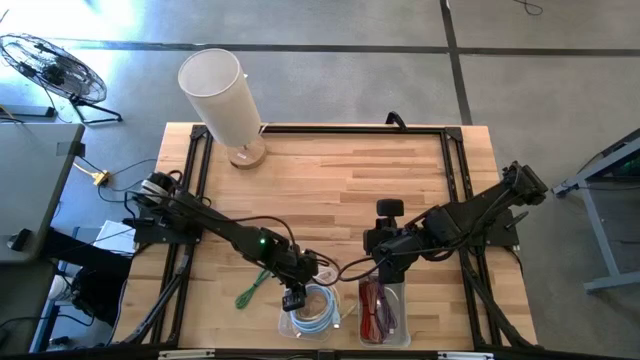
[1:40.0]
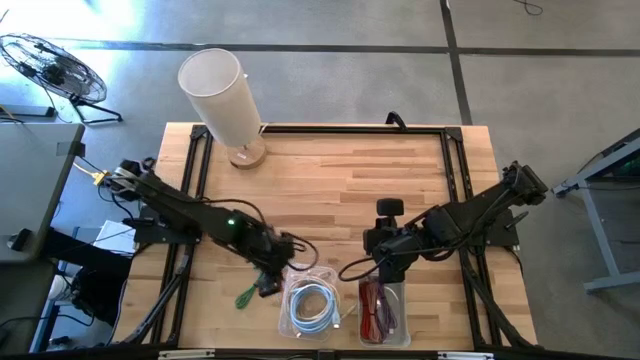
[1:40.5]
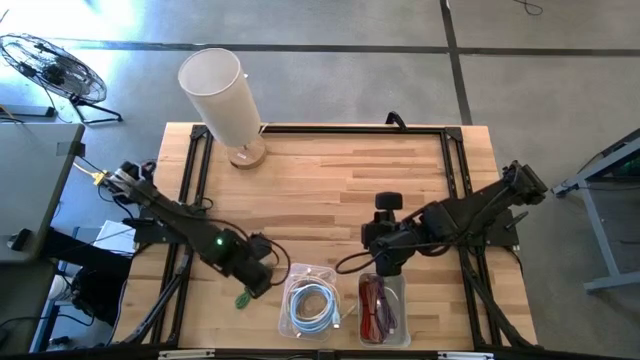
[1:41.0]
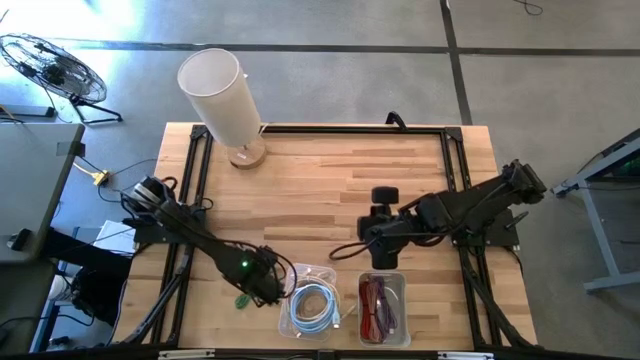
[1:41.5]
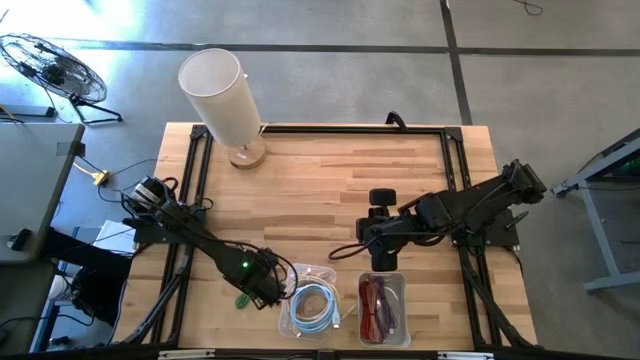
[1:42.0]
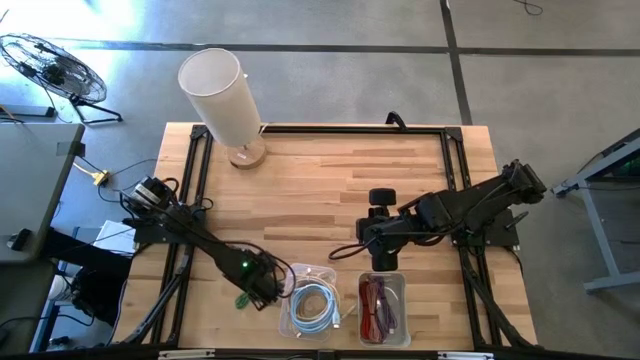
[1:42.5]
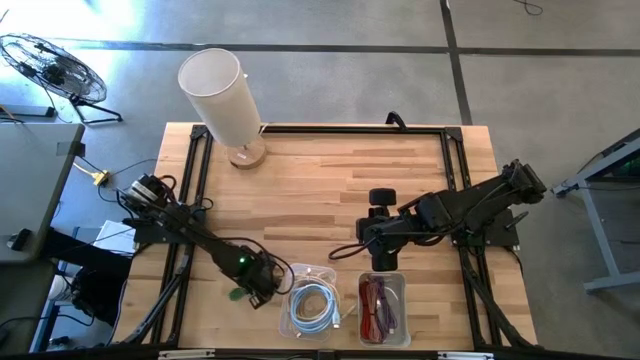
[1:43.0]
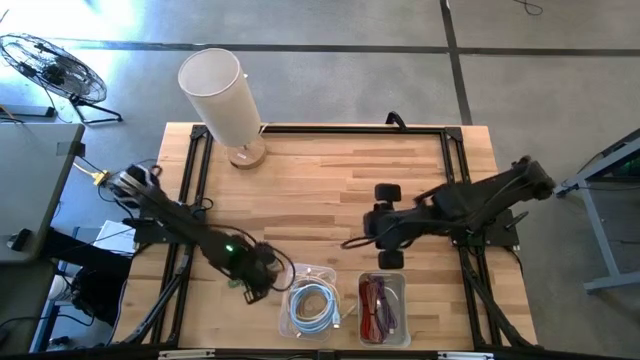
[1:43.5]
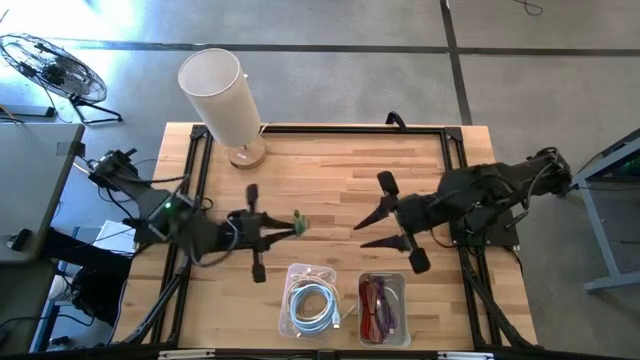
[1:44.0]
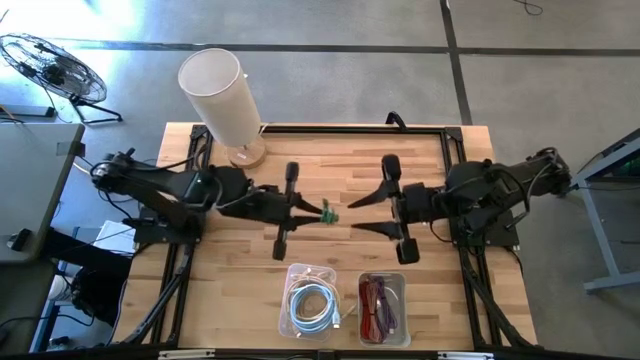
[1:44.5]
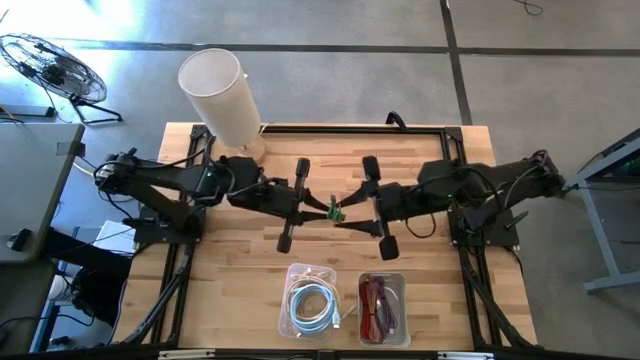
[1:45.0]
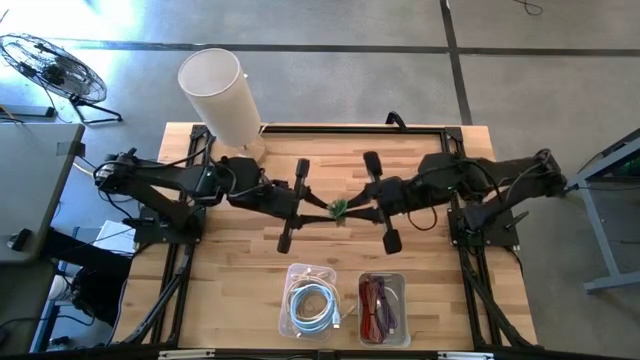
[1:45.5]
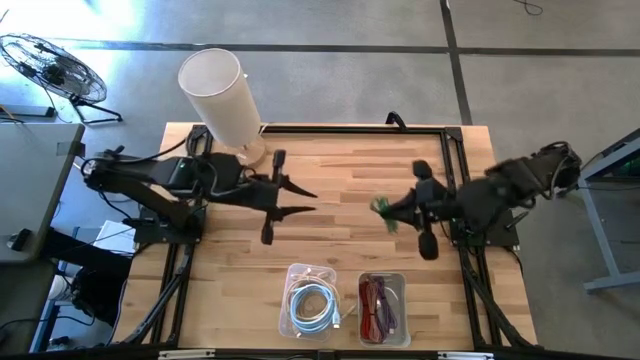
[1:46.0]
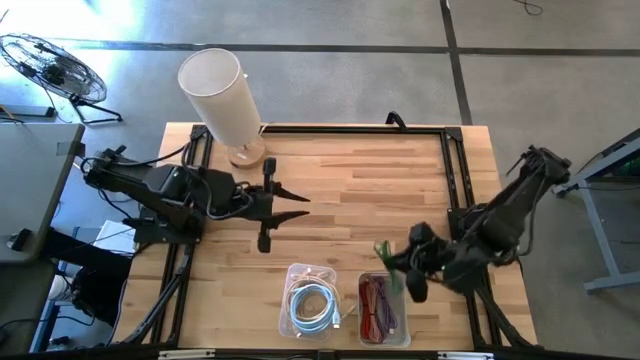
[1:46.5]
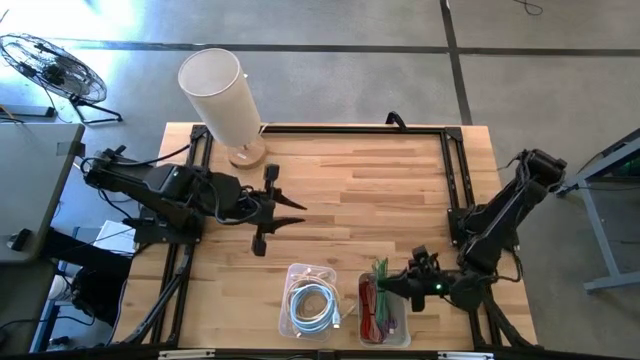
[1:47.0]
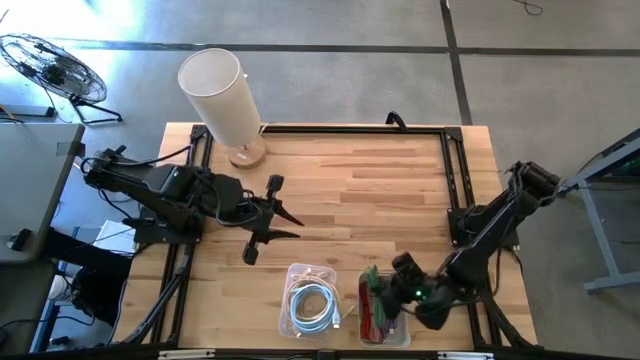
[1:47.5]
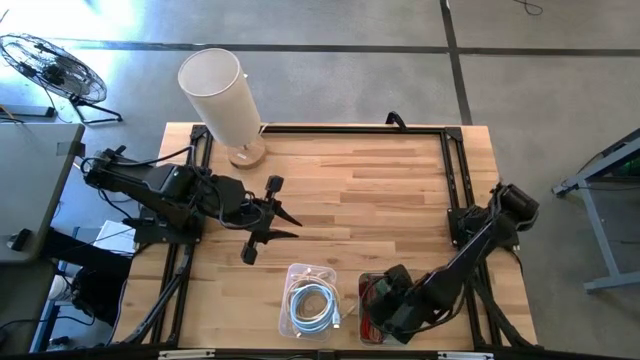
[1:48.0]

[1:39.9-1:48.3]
Task: Pick & Place USB Port
Put the green USB cable into the gray bin

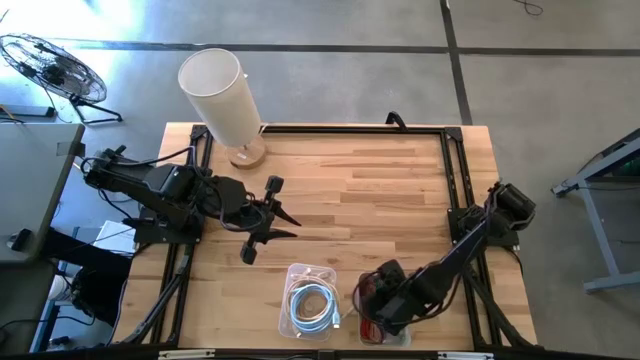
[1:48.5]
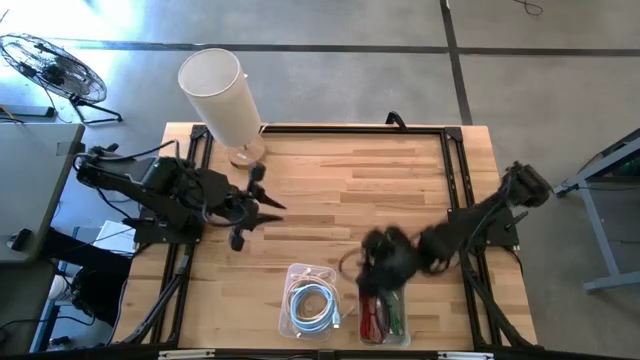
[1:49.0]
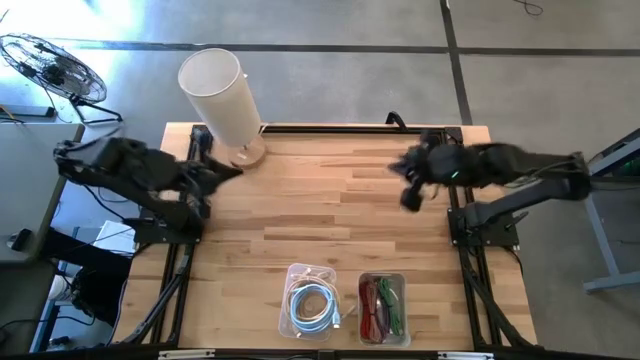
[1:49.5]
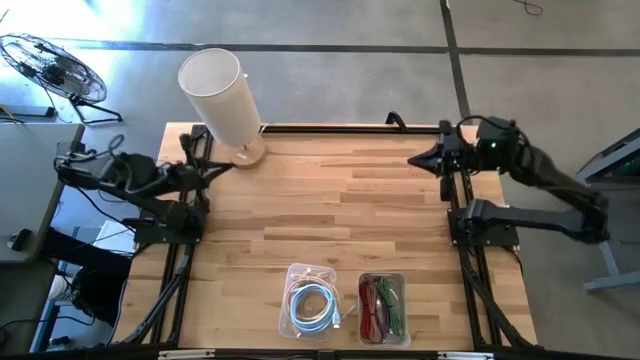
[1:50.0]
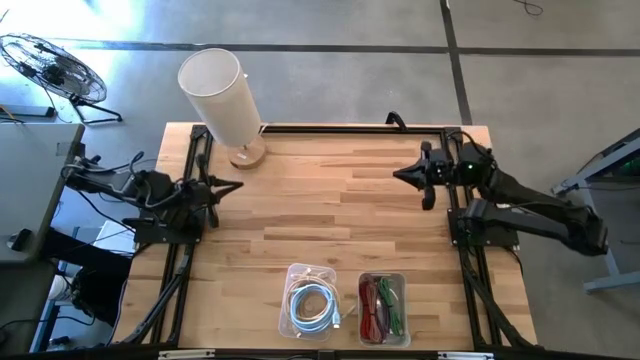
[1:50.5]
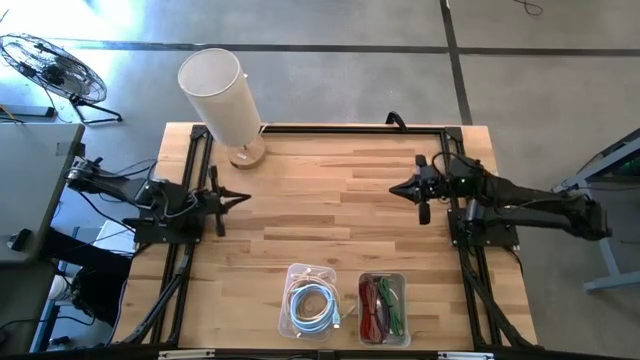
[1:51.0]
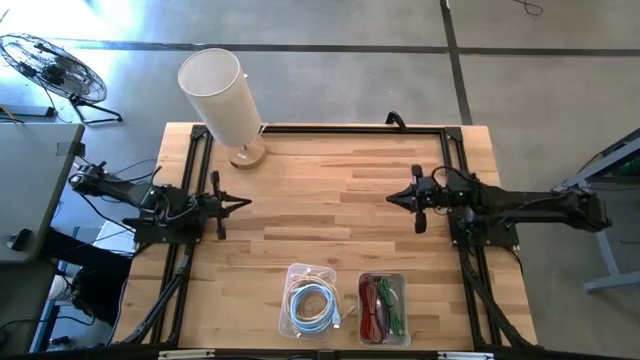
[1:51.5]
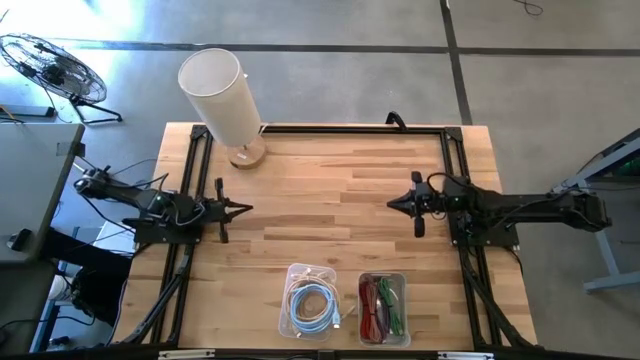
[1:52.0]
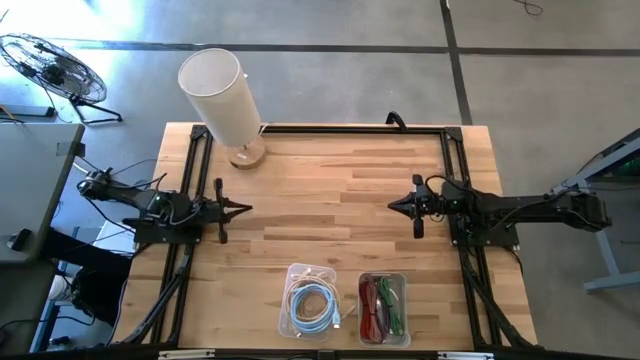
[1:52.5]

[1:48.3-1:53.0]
Return to Home Position

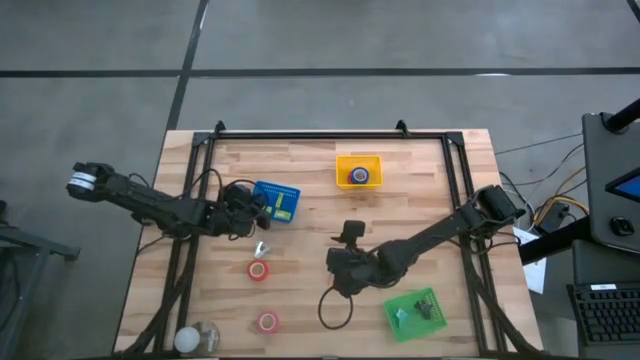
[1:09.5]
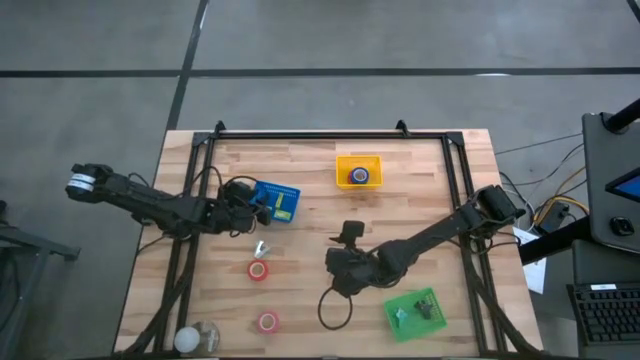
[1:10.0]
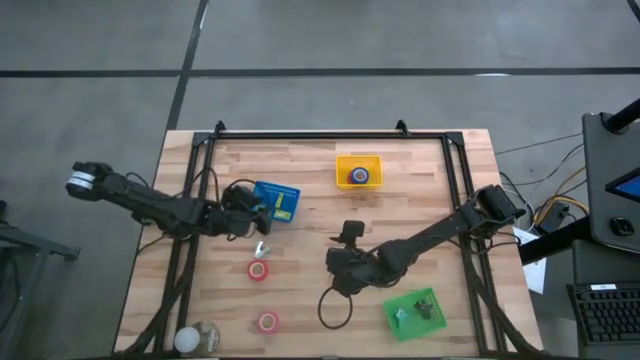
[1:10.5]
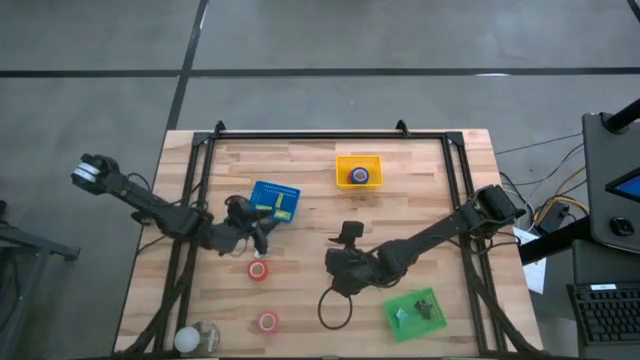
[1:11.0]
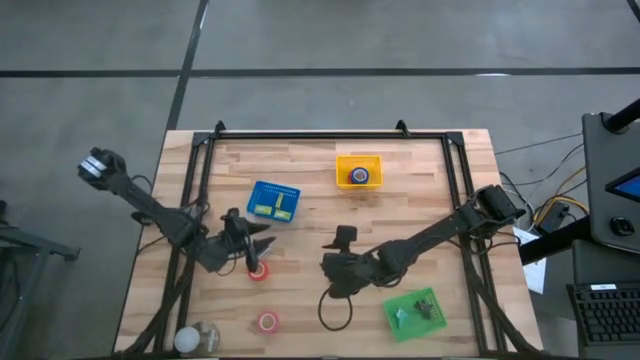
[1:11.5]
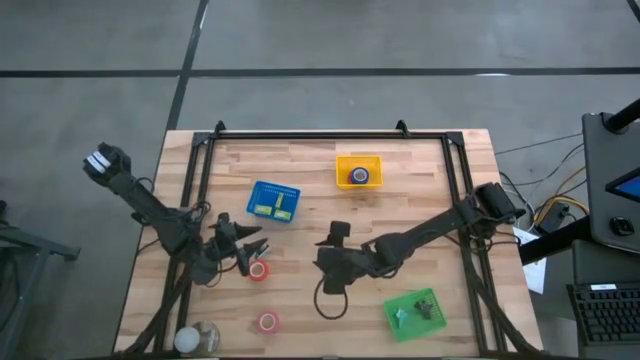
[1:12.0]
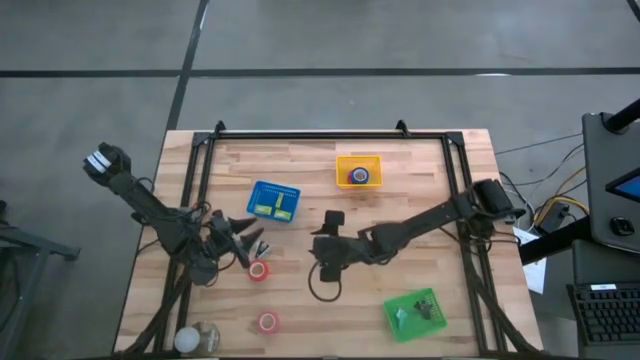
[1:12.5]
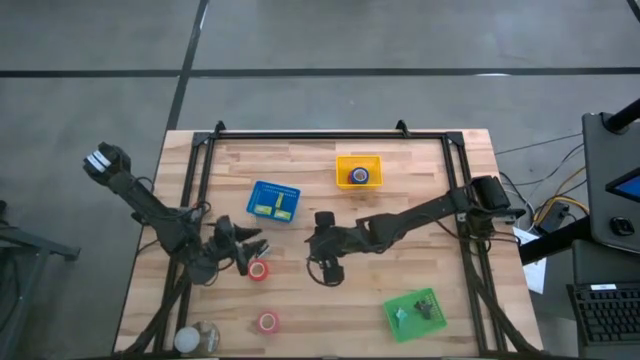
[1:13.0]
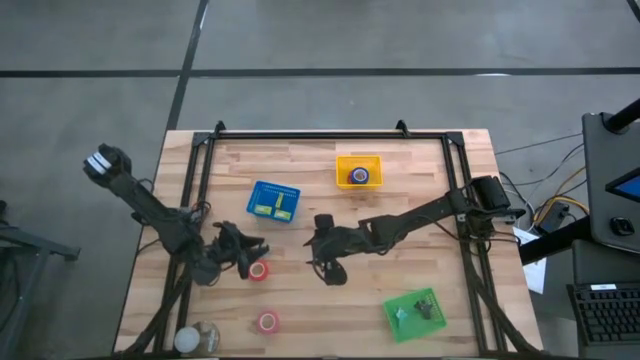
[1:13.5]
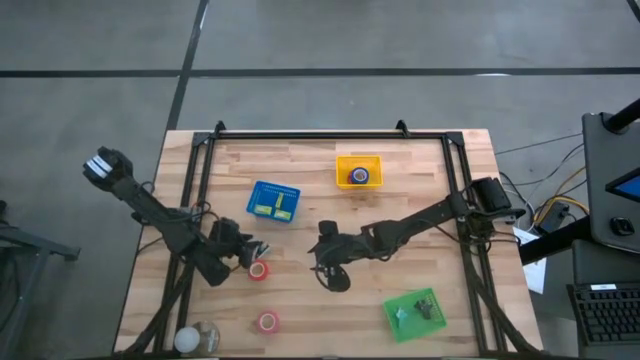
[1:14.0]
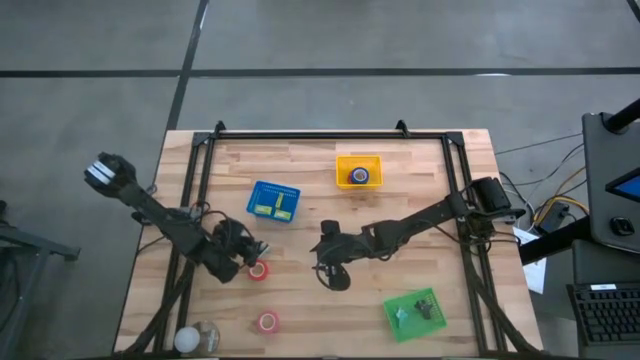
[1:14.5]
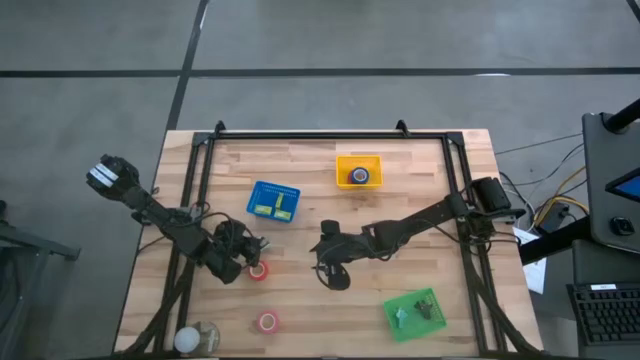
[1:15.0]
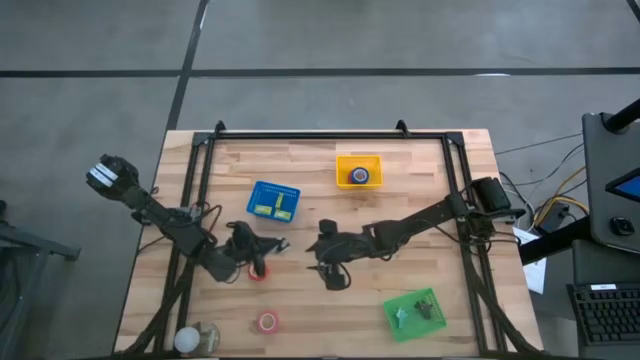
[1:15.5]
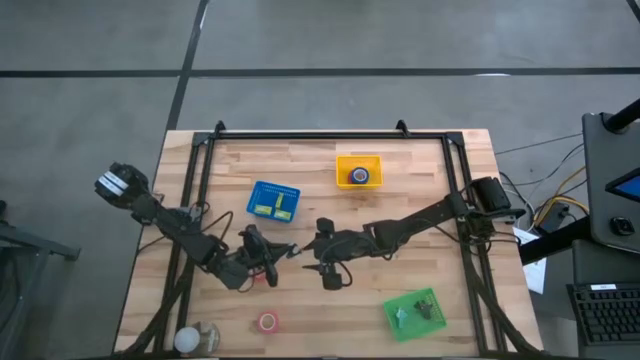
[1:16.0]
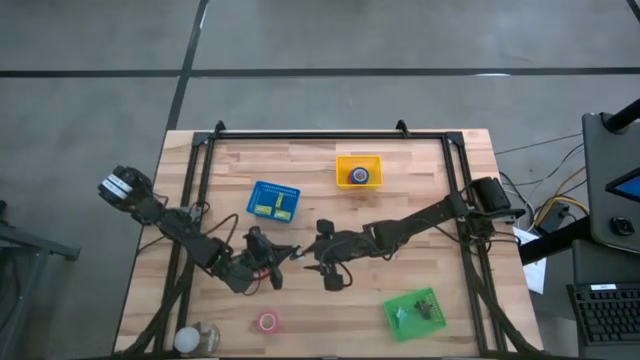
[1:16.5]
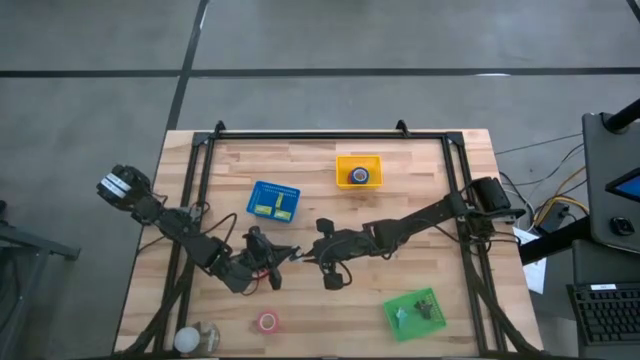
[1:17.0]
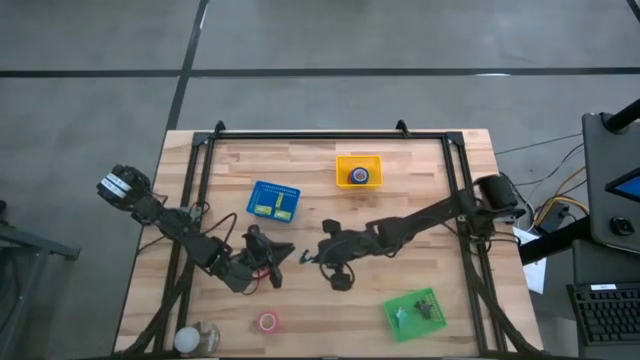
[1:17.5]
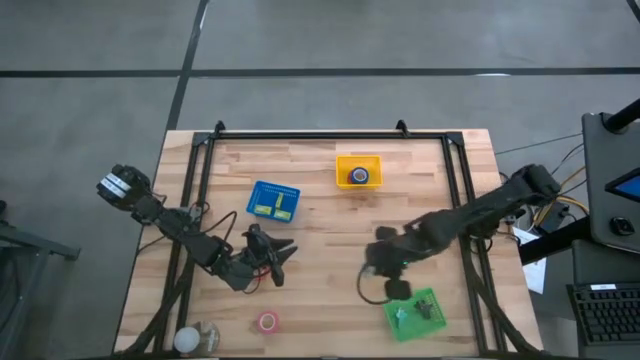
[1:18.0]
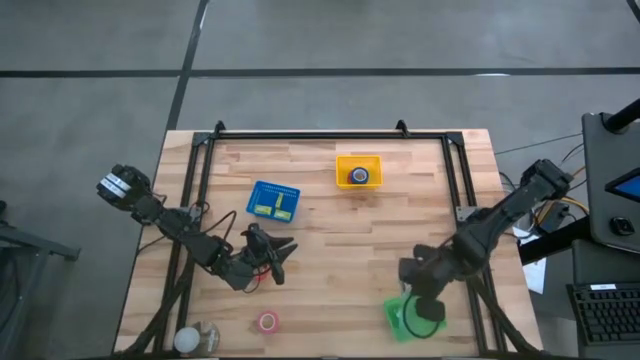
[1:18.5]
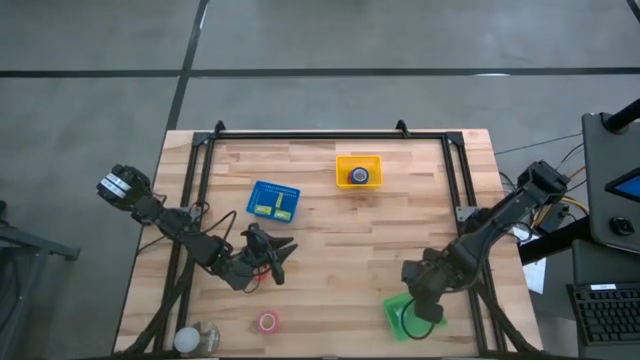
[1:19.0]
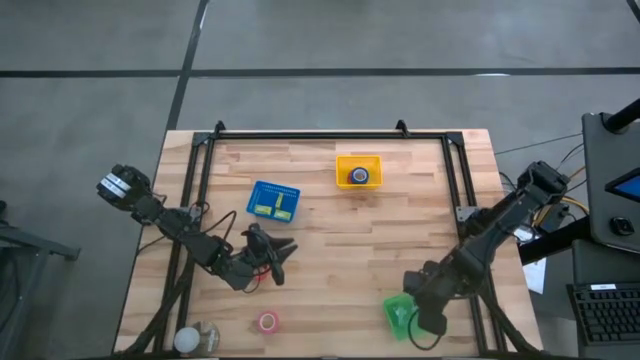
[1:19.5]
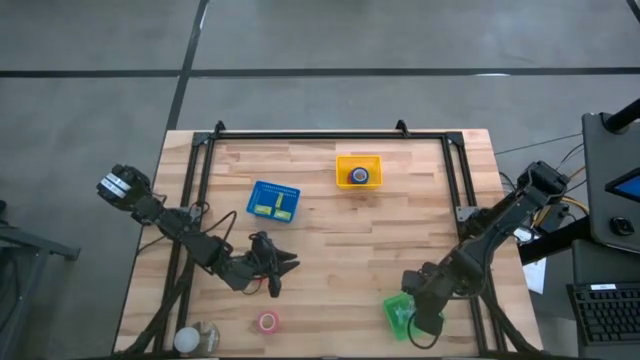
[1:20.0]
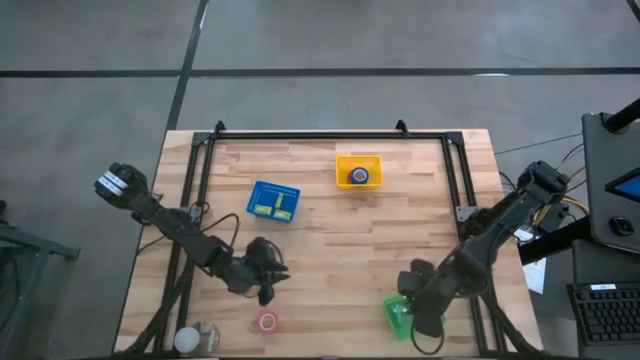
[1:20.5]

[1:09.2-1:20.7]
Task: Pick and place Stapler, Stapler remover, tape
Put the light blue staple remover into the green bin
